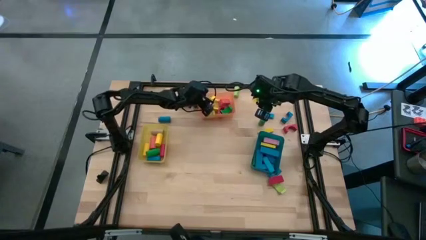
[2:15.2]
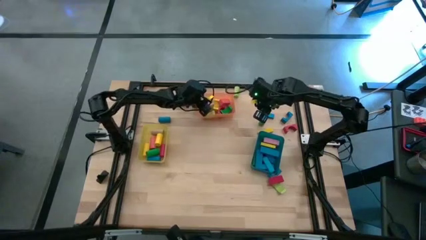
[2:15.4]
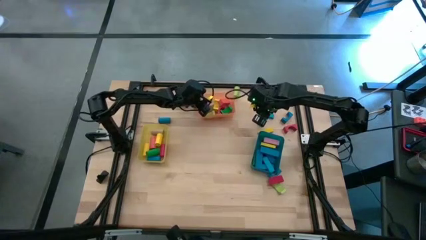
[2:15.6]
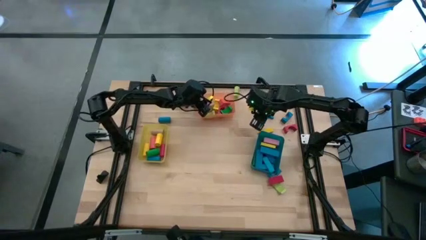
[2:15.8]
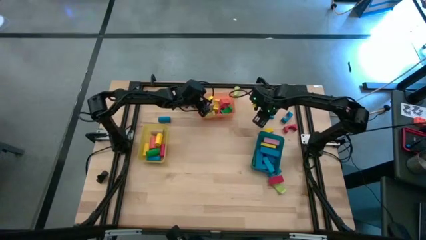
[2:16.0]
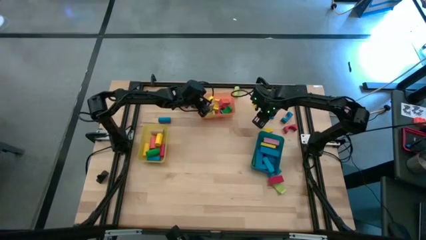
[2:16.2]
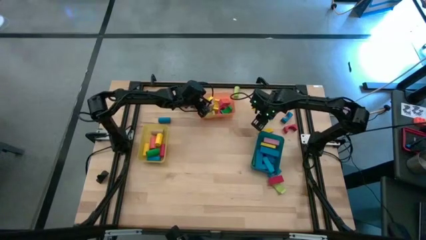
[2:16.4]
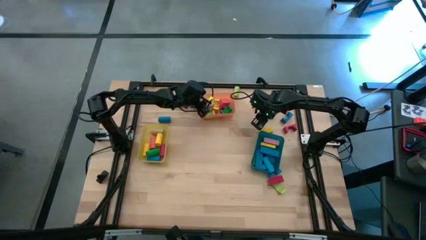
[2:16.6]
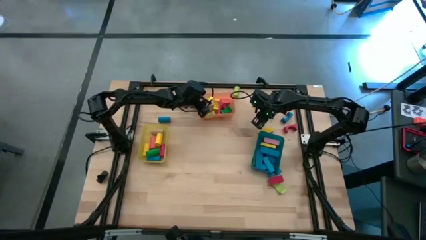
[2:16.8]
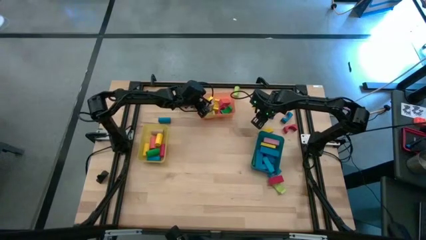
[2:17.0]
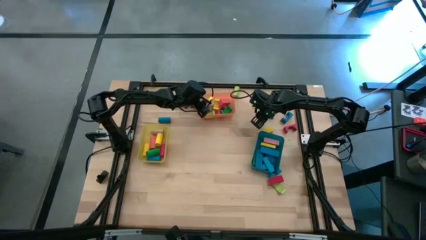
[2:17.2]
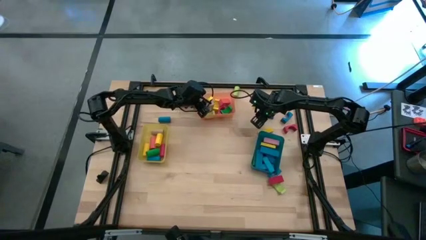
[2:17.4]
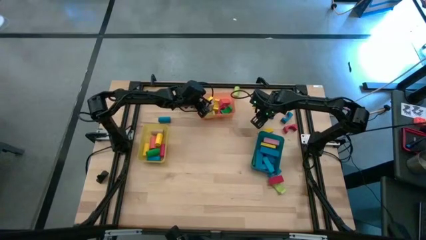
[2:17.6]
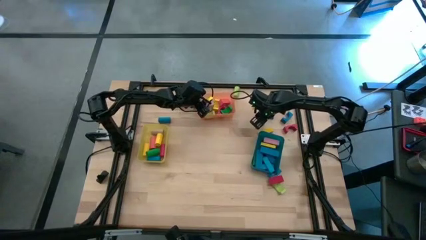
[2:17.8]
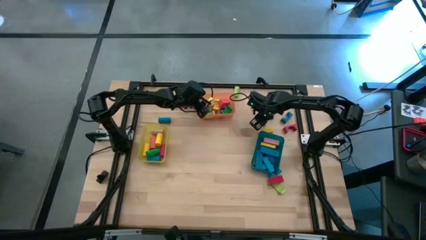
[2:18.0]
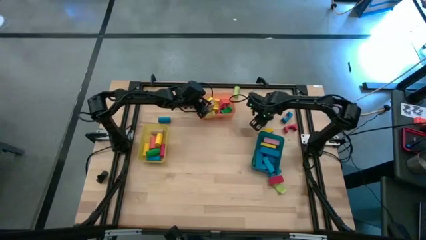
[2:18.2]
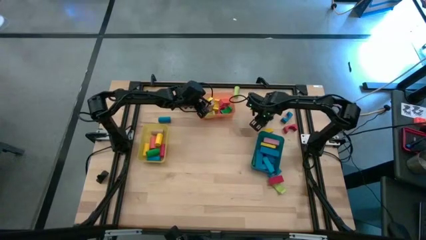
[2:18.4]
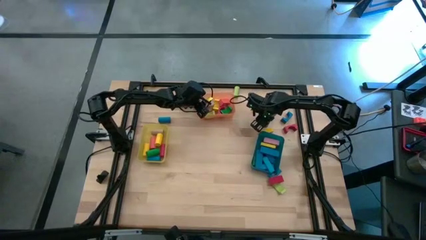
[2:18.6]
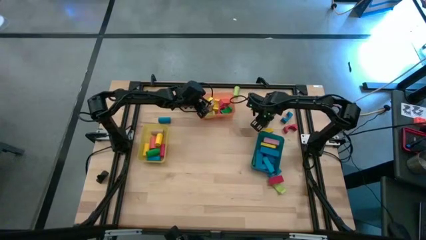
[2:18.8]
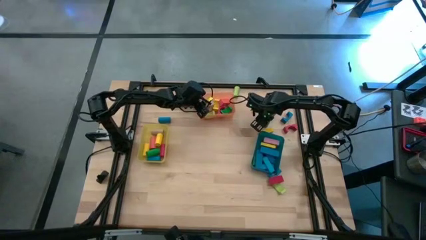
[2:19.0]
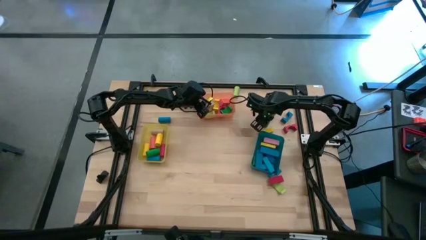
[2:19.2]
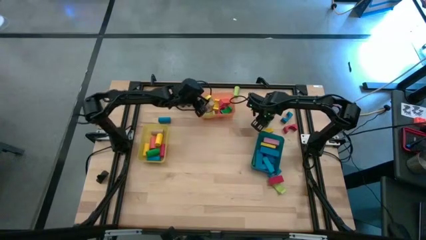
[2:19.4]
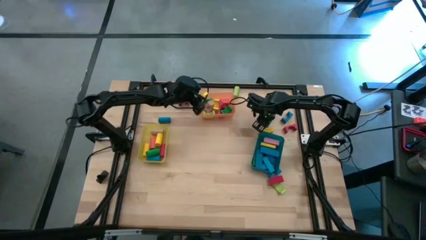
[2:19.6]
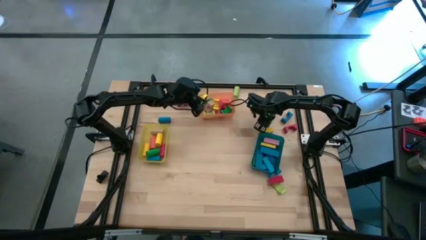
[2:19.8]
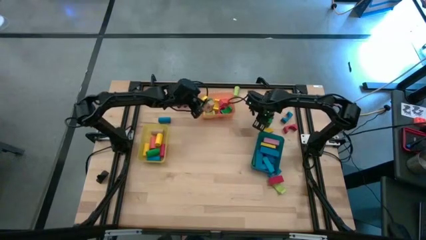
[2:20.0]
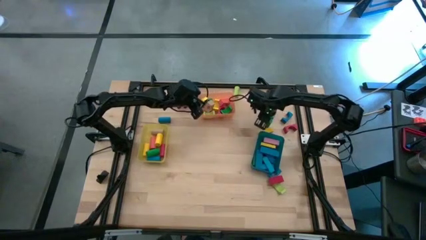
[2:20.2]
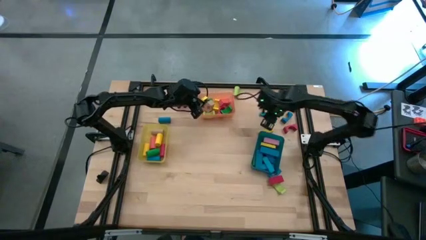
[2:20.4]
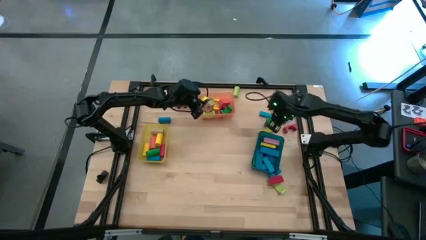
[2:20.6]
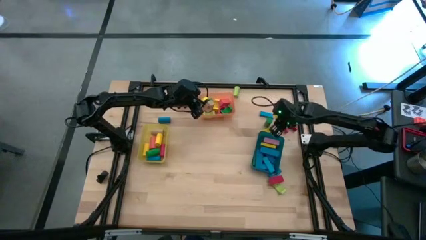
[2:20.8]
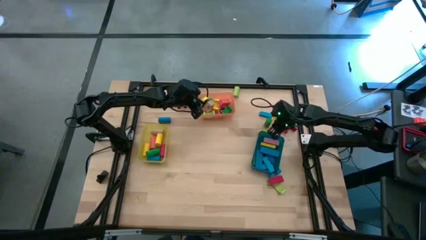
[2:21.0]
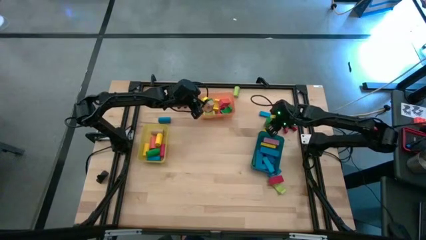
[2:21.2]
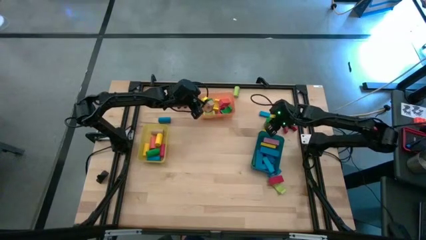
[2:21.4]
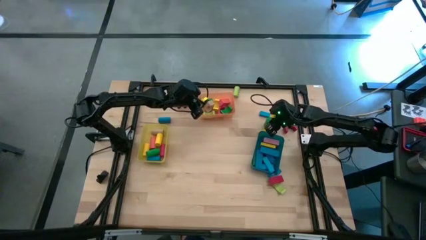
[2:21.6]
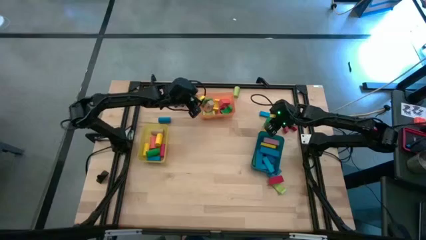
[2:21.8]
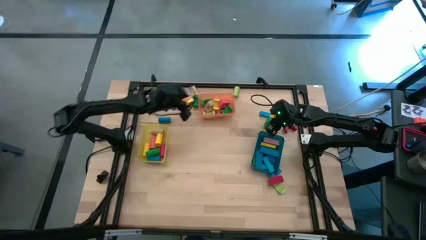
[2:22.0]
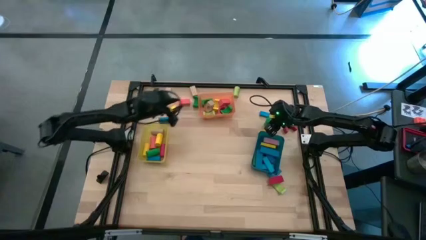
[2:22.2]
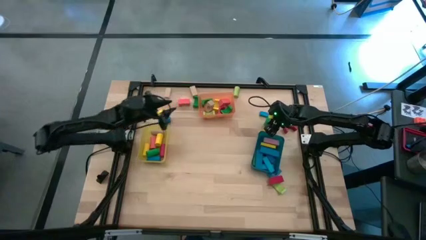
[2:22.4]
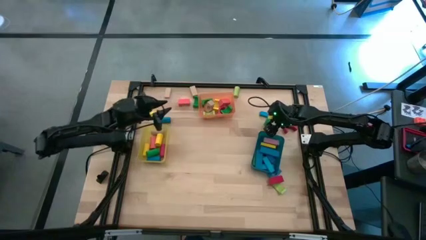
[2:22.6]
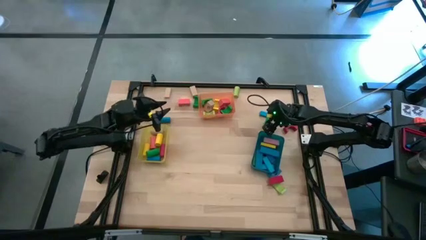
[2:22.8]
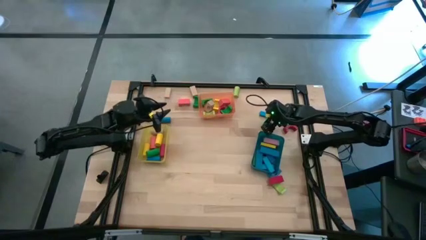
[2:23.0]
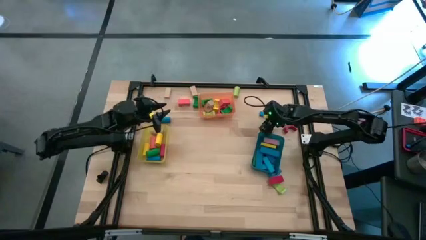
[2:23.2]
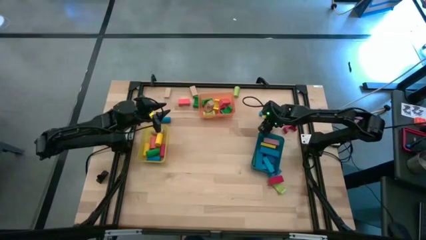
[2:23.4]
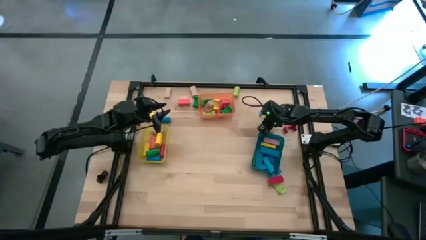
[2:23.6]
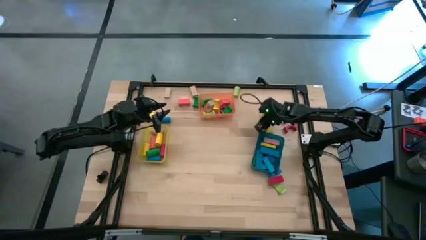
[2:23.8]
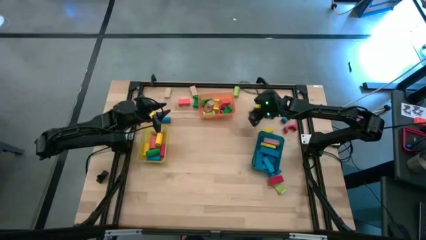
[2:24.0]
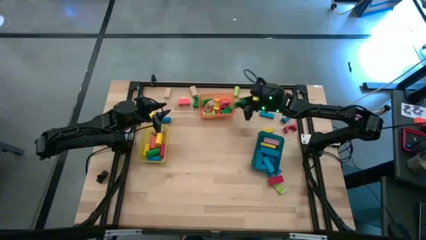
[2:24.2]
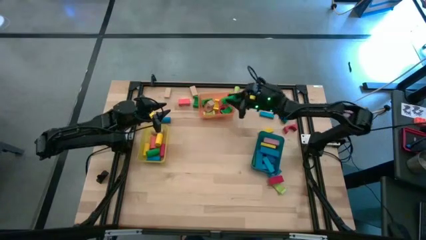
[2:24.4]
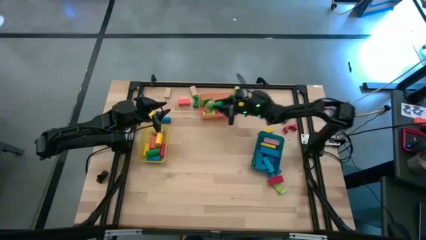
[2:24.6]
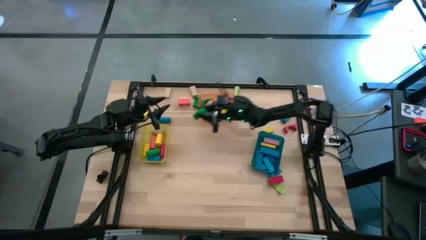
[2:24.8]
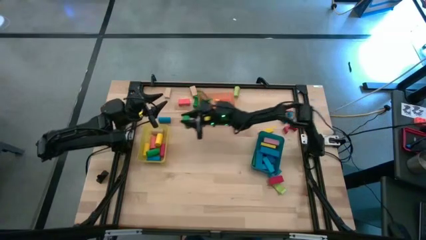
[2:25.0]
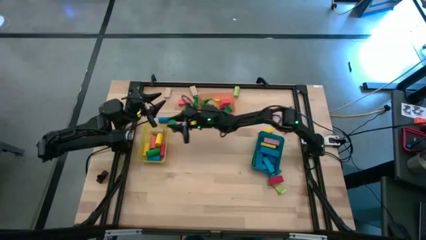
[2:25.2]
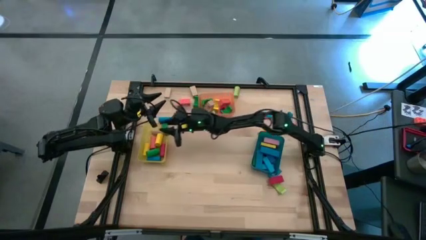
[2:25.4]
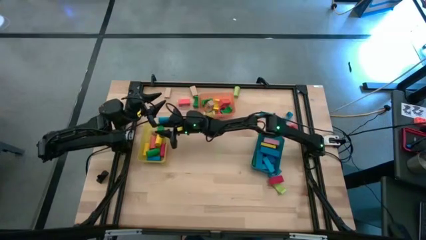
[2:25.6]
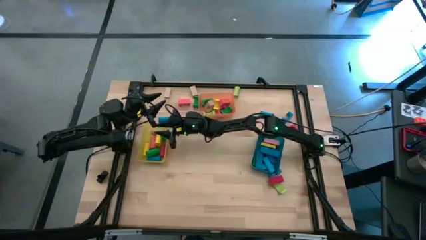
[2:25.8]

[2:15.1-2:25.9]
Task: Sort blocks by size
Put the green cylindrical block into the yellow bin

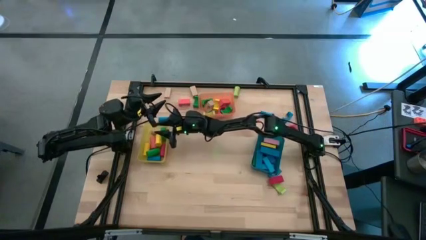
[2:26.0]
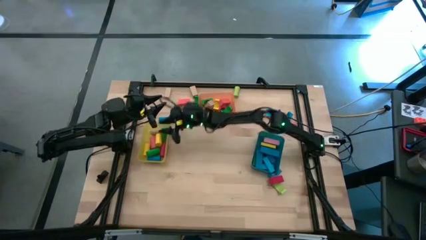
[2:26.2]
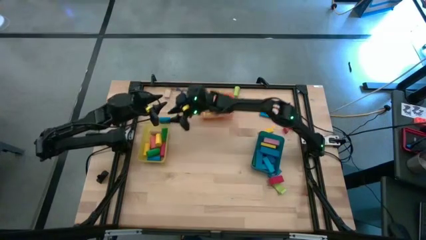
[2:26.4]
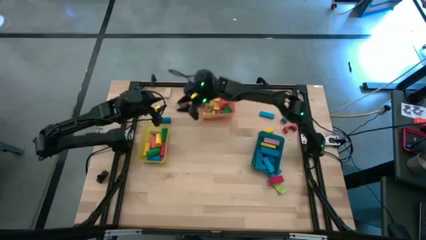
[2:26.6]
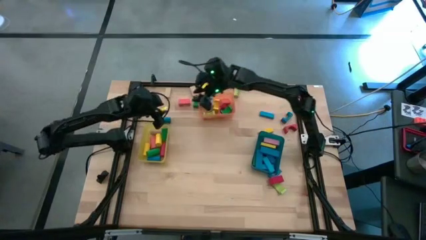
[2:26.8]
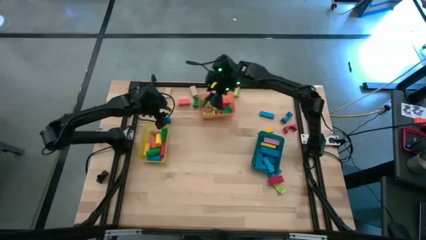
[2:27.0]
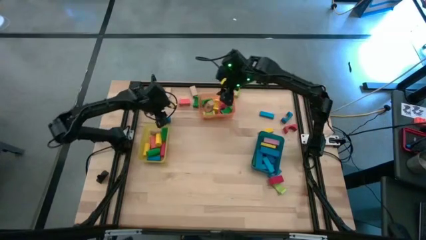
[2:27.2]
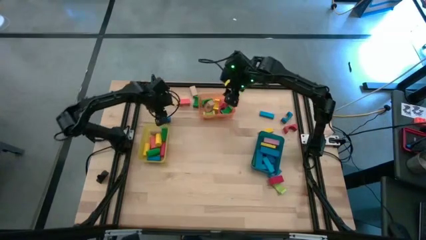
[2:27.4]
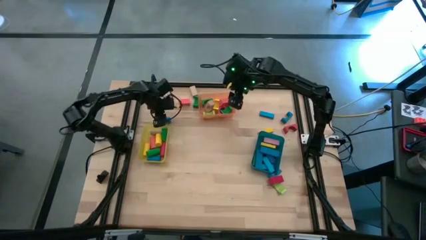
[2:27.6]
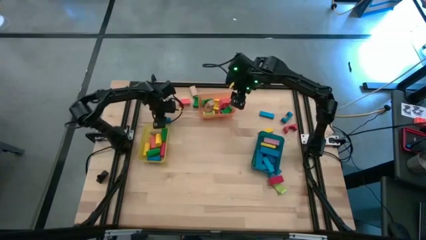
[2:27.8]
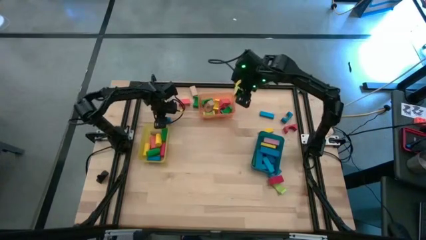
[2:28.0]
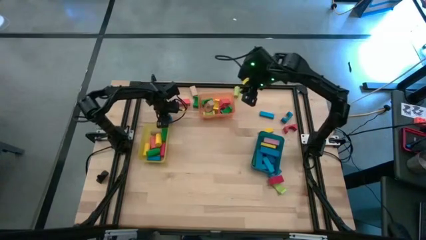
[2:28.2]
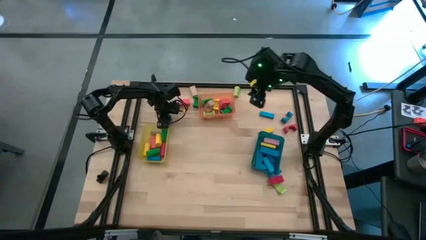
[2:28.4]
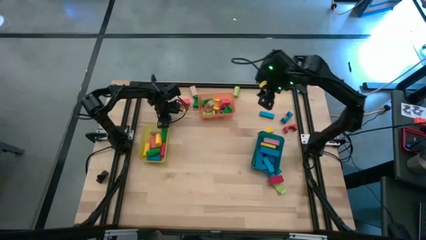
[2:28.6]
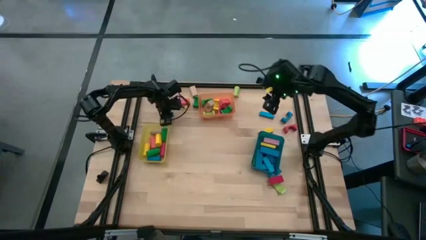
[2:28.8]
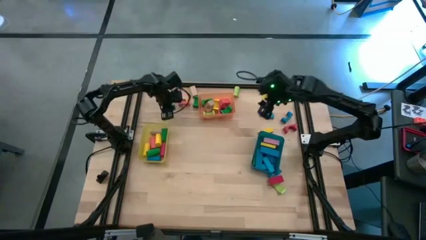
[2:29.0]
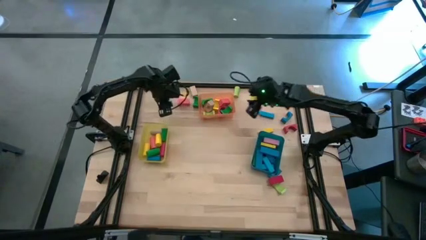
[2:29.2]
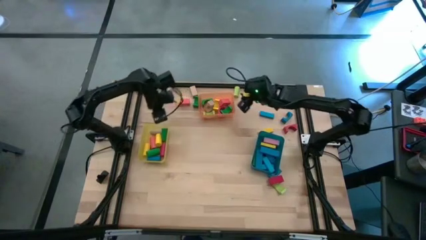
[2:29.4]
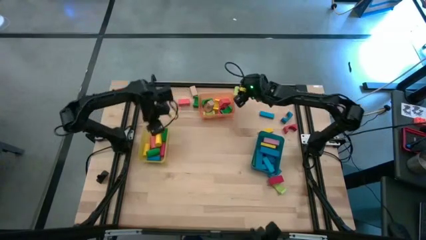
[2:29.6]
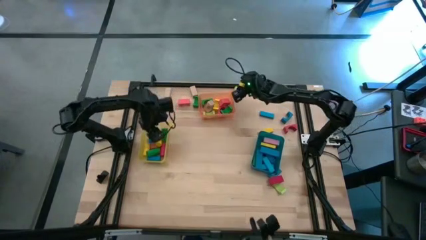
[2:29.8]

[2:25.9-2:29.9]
Put the blue cylindrical block into the yellow bin

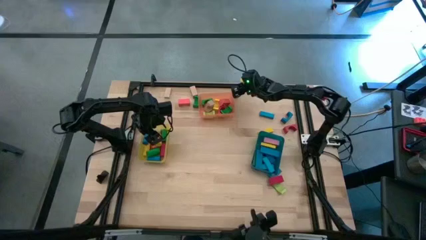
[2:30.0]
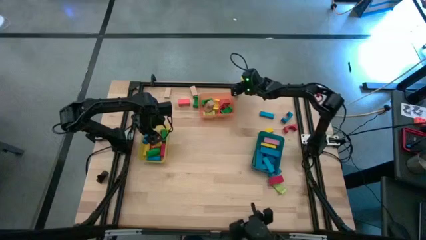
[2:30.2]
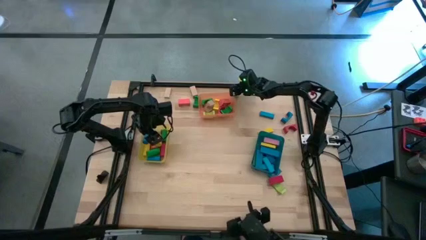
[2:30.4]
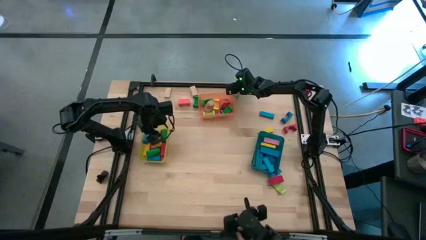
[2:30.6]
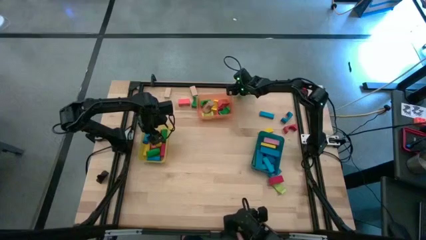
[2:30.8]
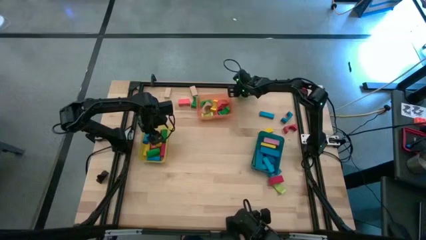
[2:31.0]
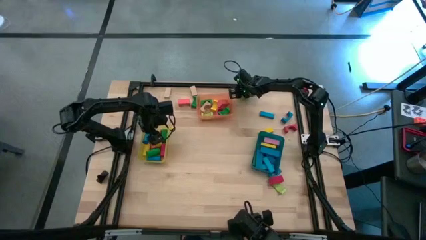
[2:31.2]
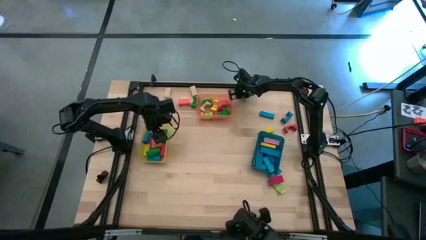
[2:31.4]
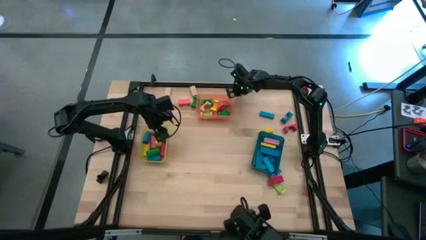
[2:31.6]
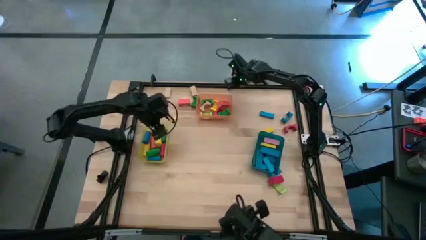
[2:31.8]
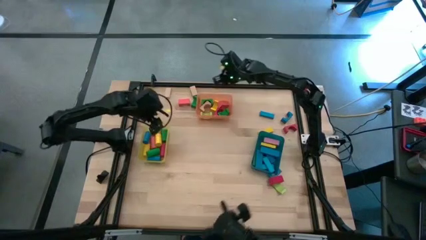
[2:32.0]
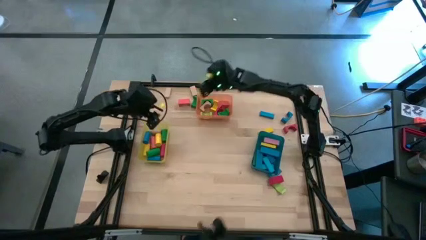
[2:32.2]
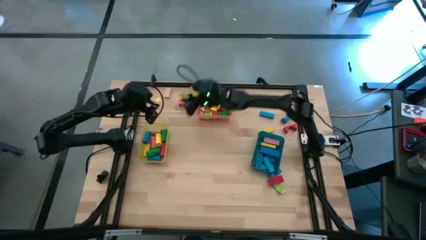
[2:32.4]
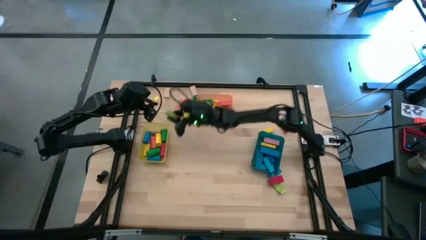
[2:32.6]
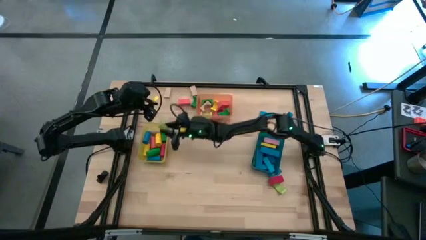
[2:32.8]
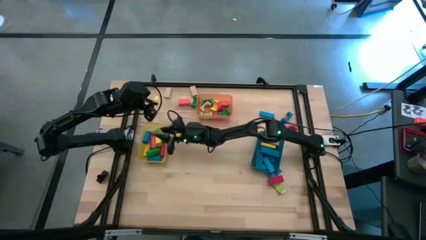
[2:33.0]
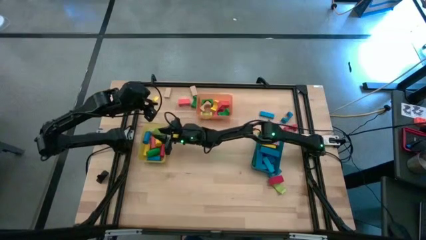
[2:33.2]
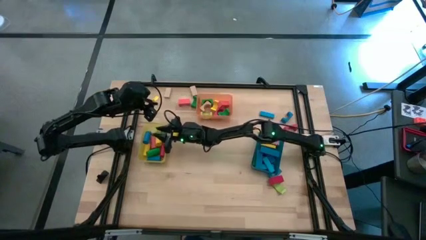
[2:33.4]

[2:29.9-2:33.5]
Put the light green cylindrical block into the yellow bin
